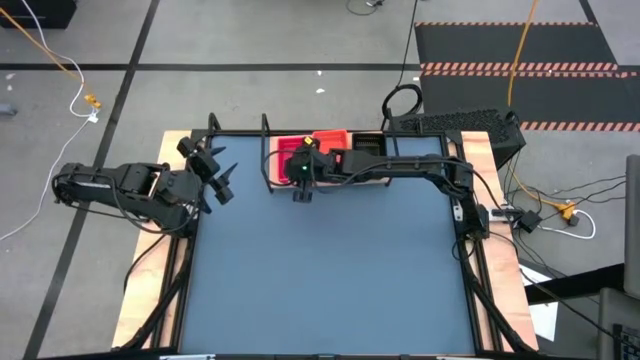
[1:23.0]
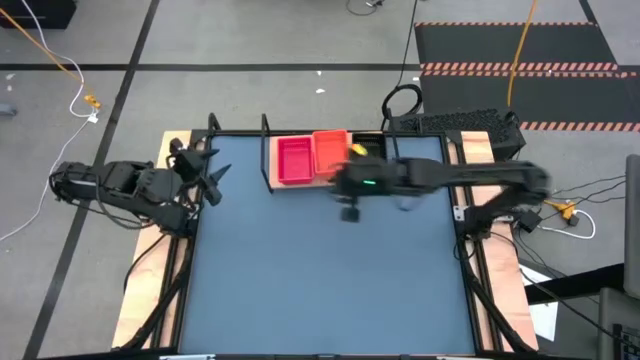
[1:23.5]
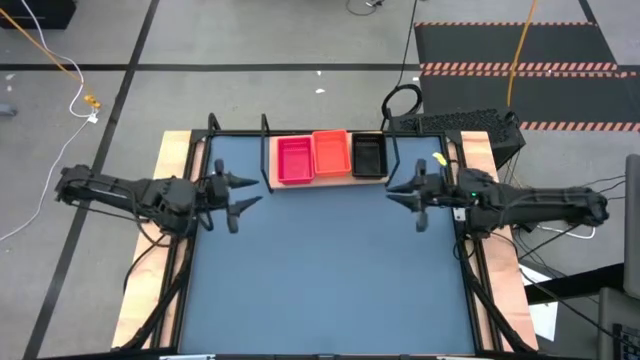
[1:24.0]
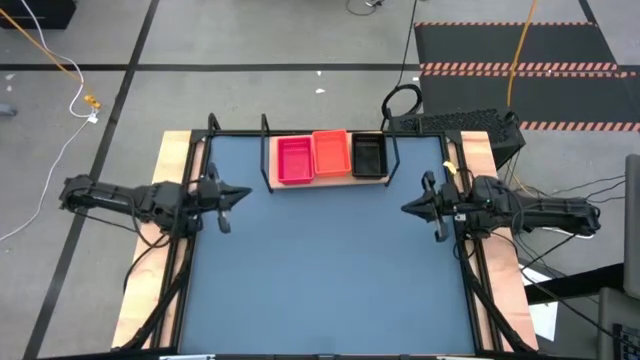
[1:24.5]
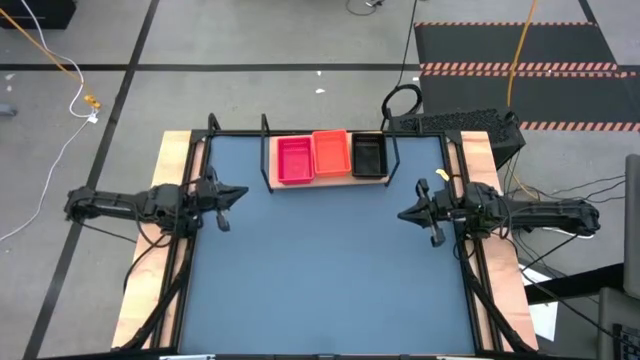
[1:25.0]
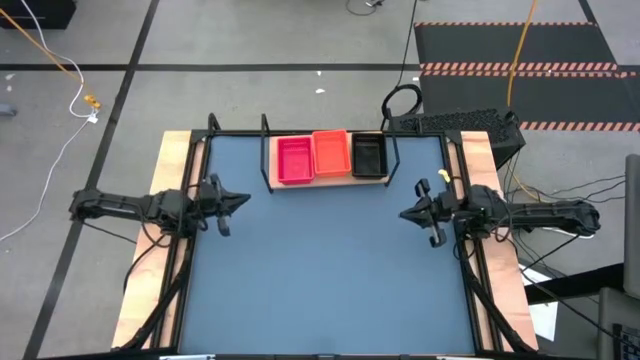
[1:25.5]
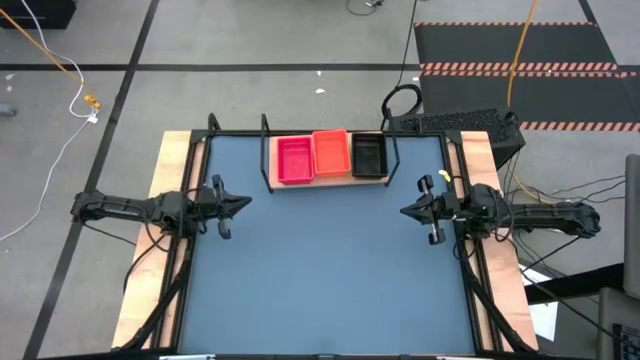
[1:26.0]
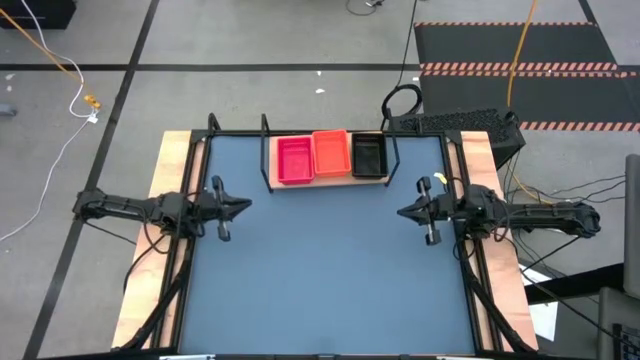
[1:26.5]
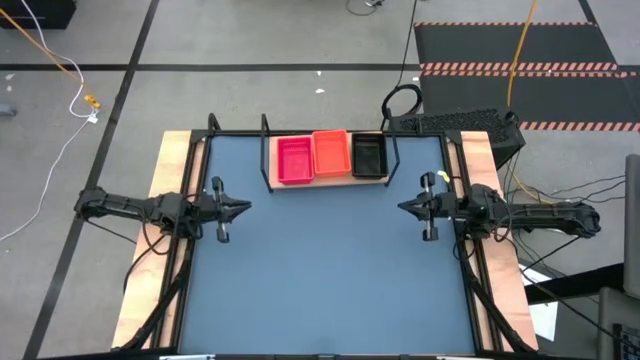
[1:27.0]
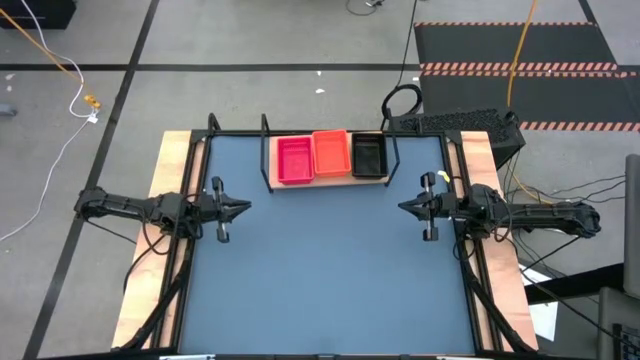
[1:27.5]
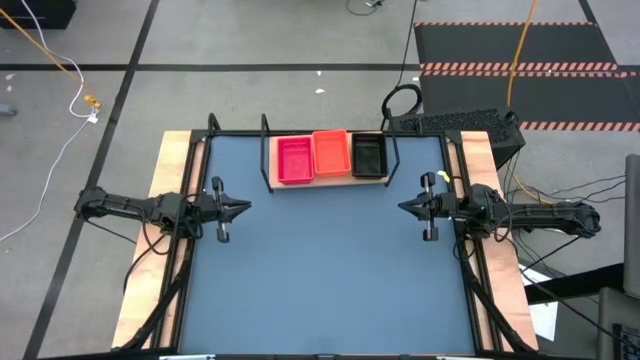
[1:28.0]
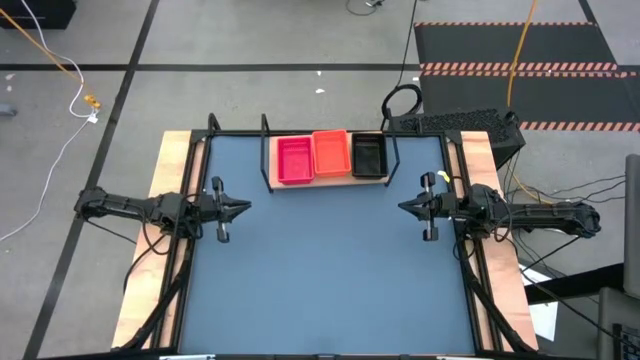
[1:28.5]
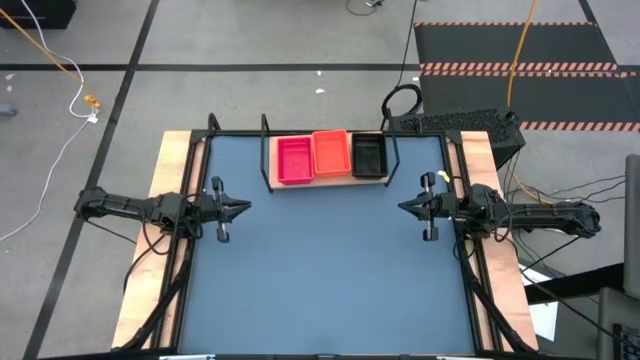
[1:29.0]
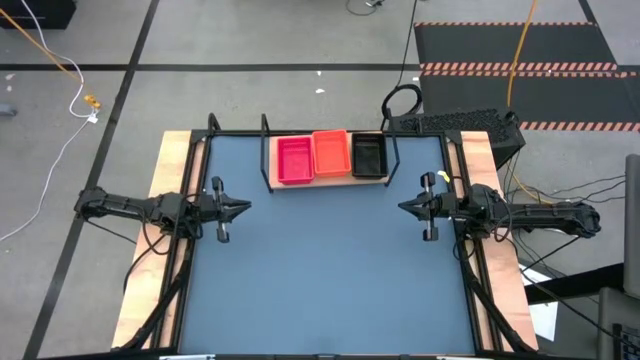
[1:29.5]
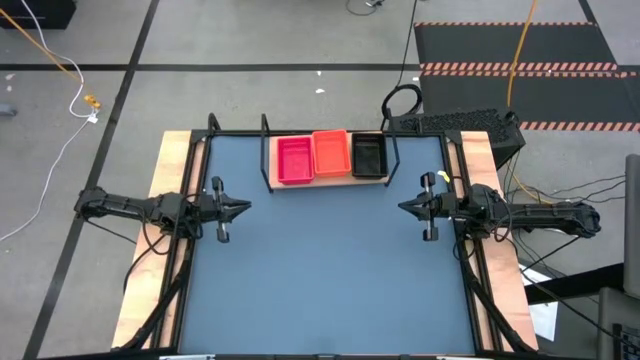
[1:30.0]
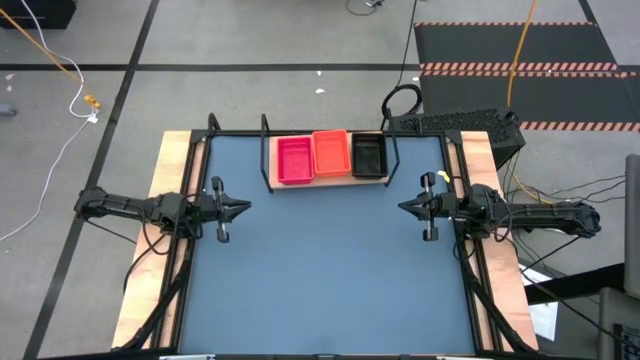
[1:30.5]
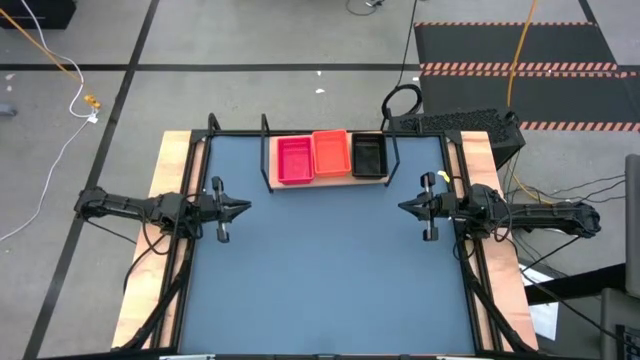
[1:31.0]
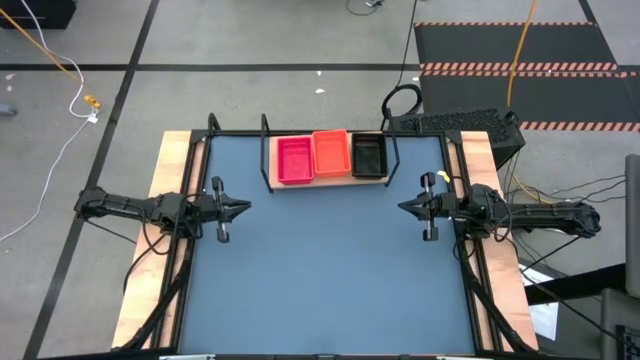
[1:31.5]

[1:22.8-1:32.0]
Task: Stack baskets on shelf by color
Return to Home Position

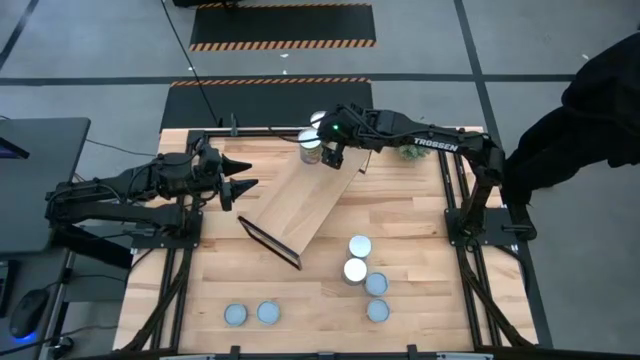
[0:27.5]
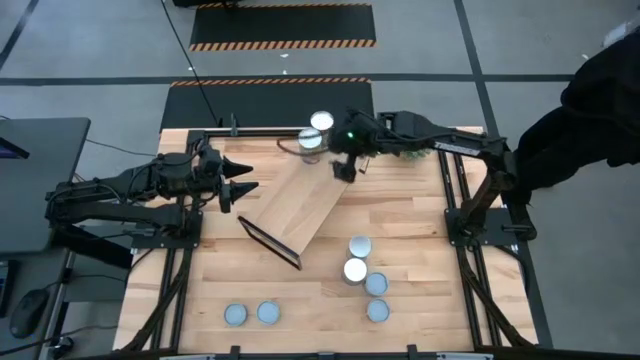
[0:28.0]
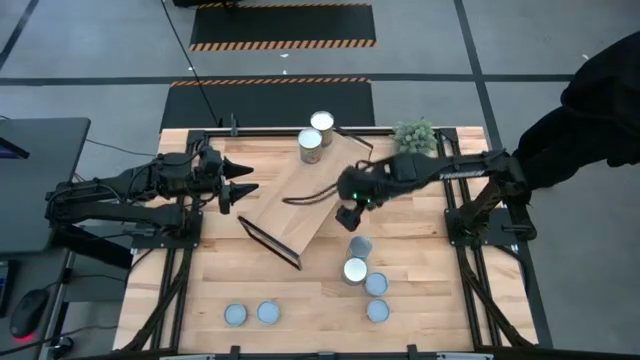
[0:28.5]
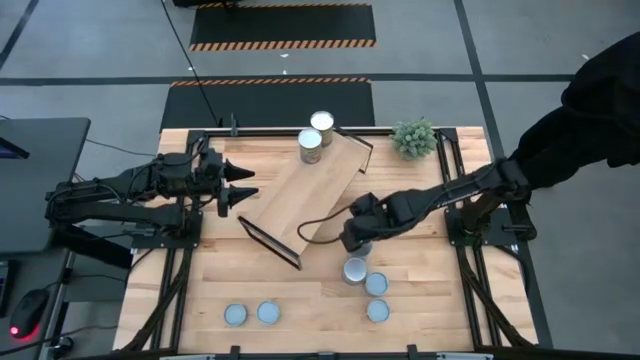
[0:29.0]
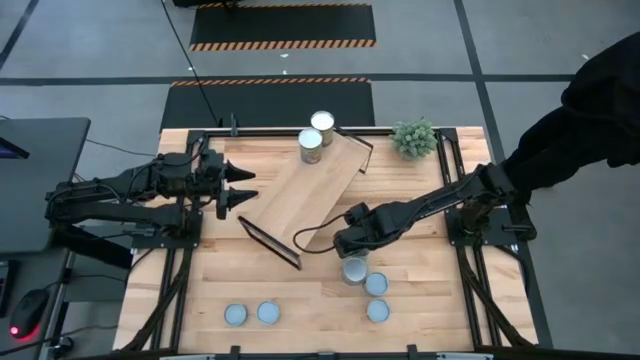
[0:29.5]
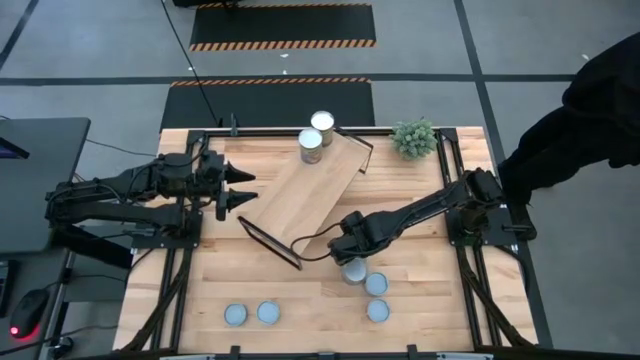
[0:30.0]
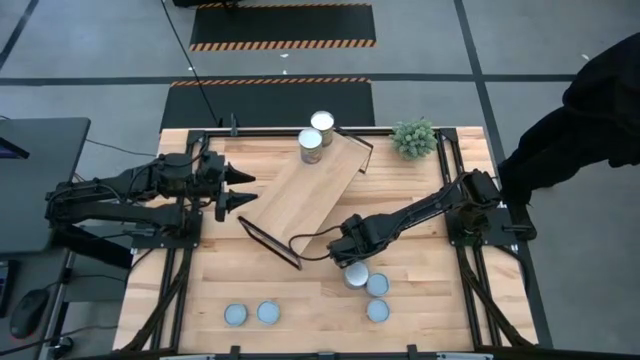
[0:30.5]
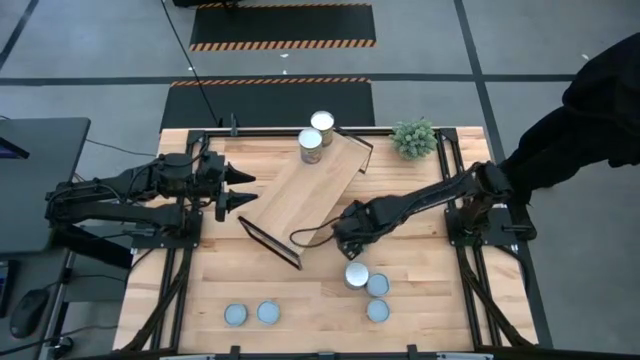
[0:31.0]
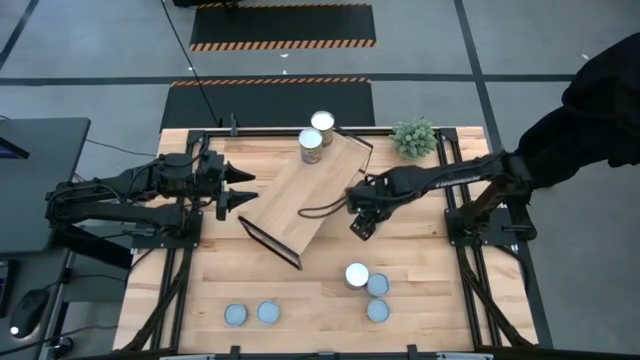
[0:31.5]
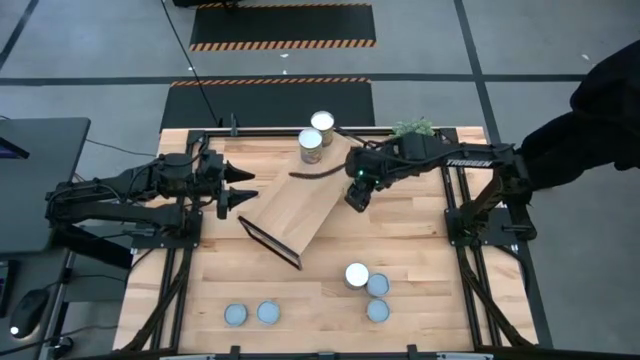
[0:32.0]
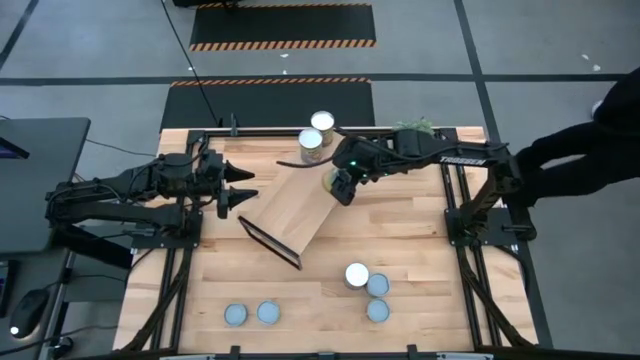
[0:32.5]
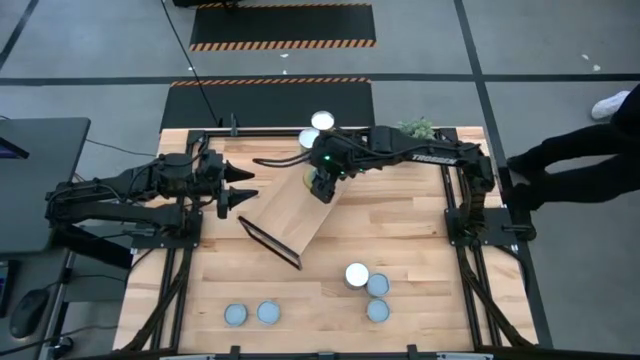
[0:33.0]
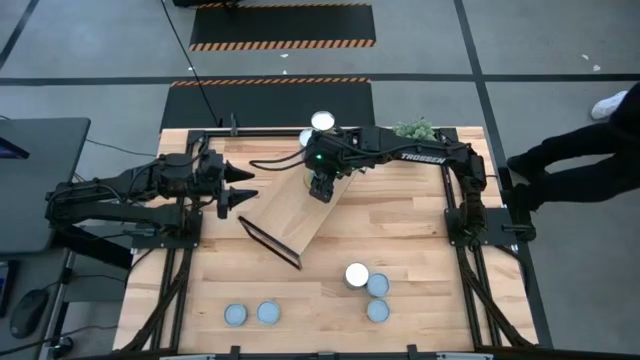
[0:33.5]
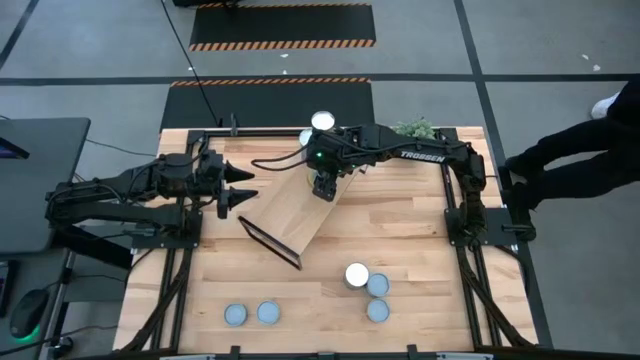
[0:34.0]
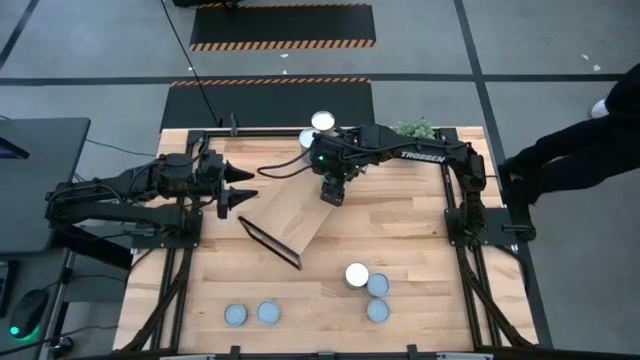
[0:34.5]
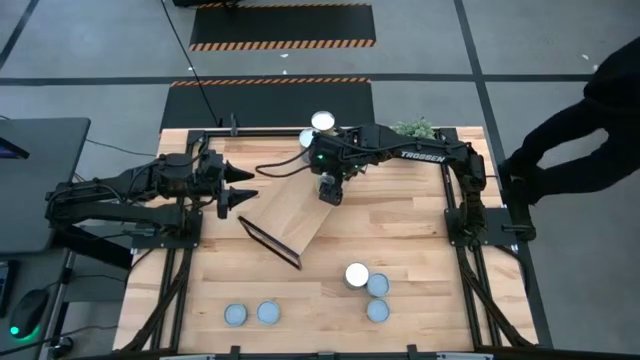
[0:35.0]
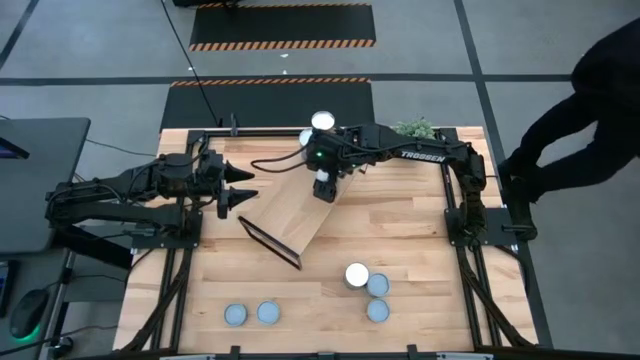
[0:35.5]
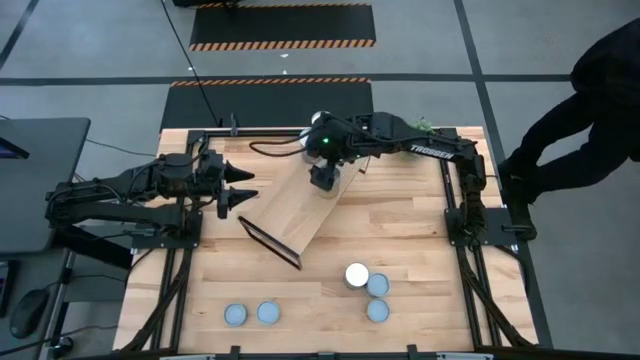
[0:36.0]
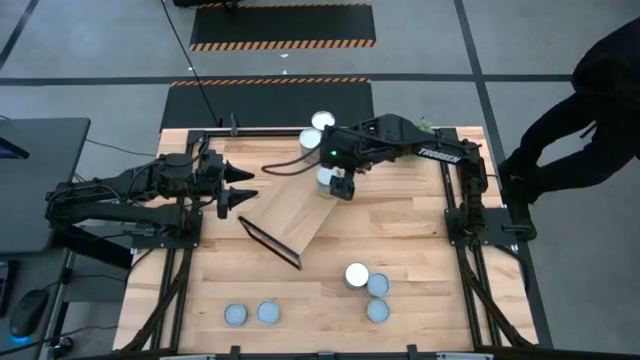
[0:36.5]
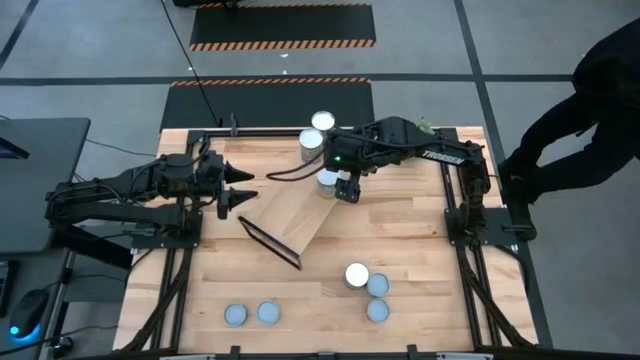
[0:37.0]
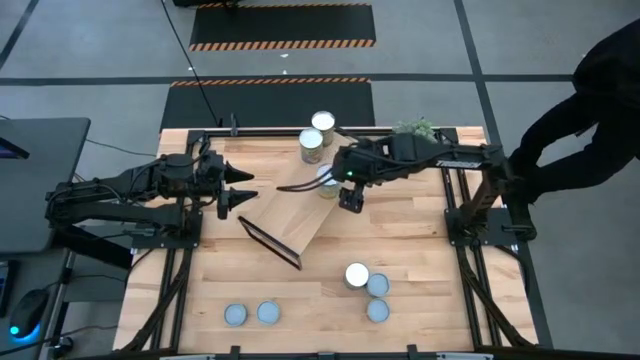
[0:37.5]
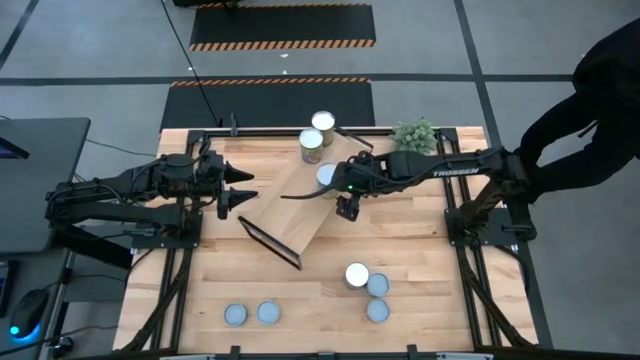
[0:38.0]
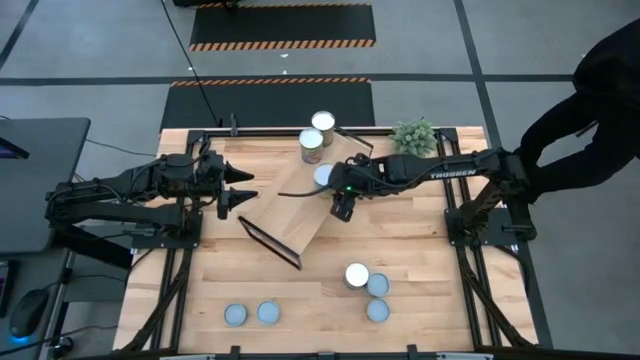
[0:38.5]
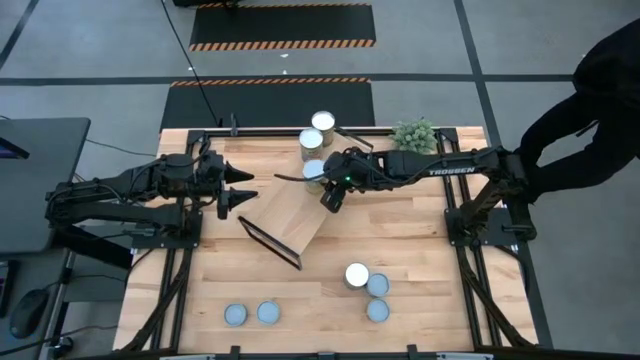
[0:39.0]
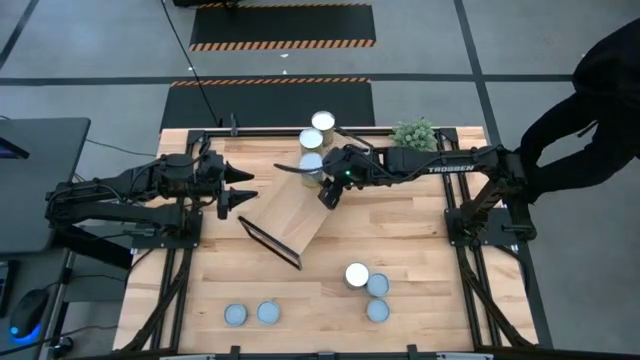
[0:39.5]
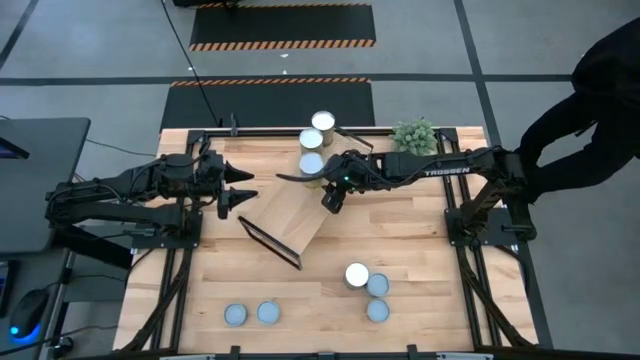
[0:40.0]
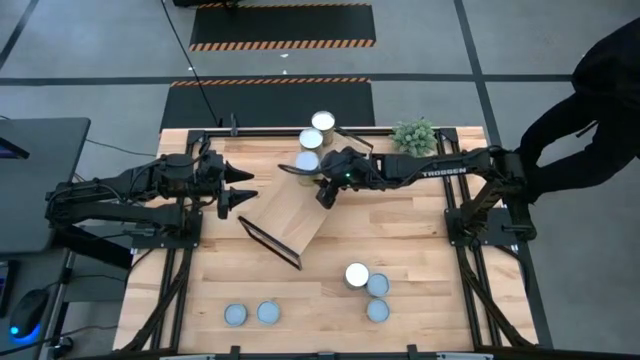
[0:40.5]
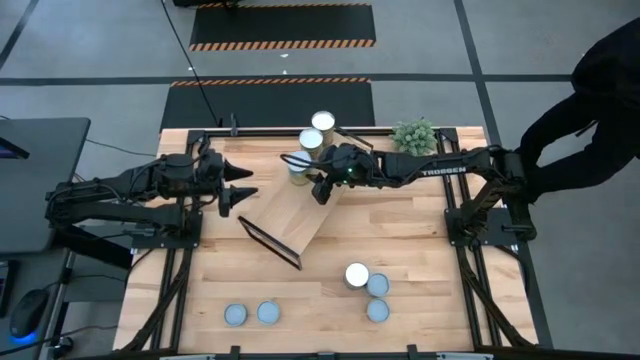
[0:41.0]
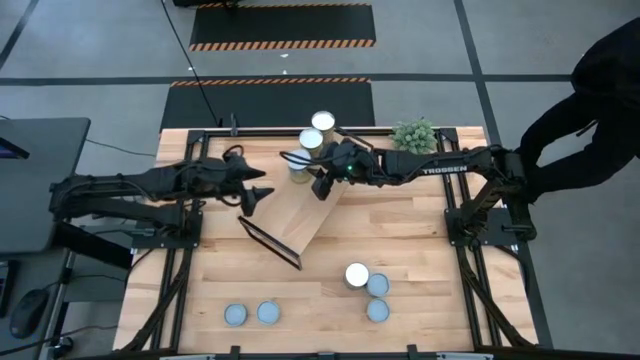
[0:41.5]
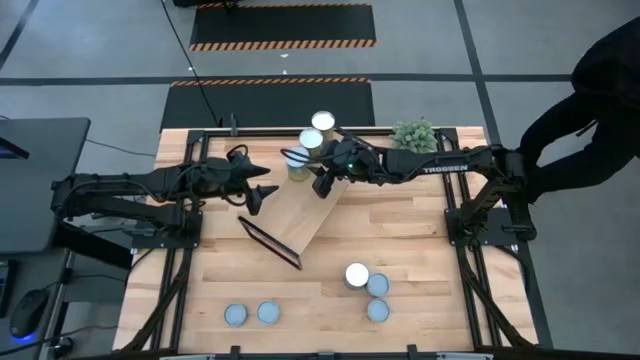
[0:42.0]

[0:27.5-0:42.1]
Task: Pick and place cans onto a shelf
Put the canned carrots on the shelf
